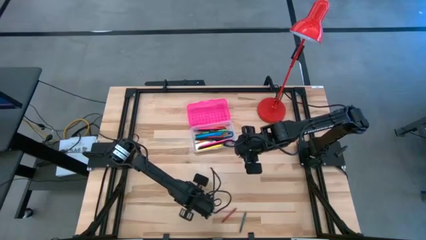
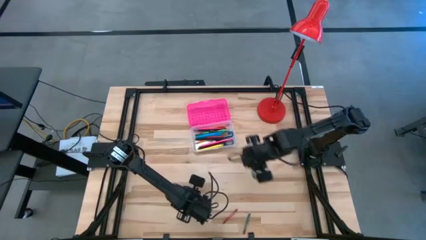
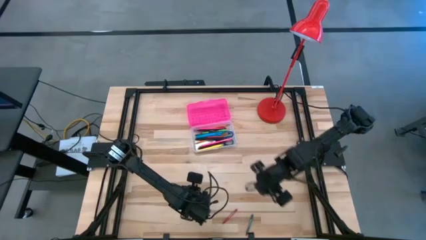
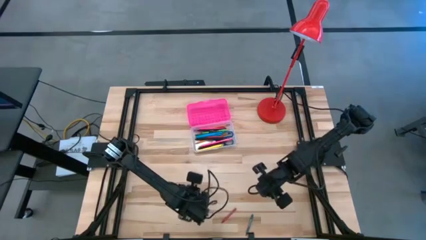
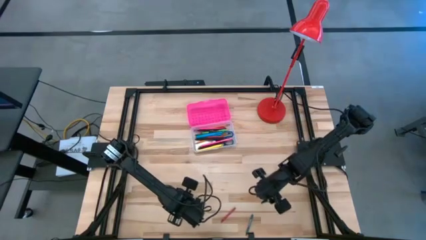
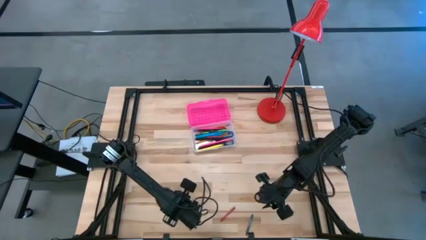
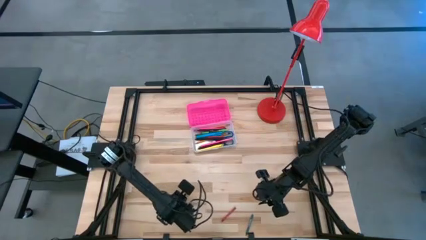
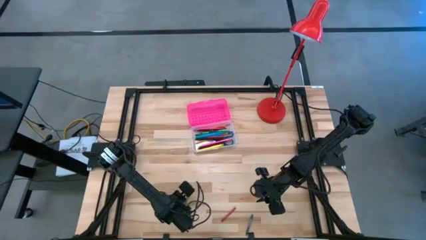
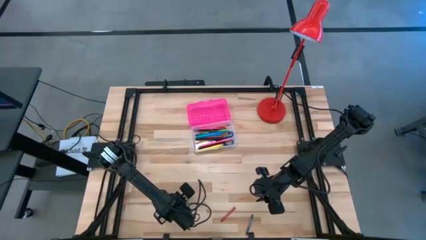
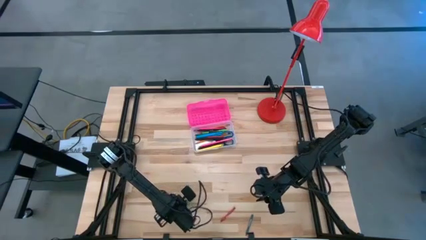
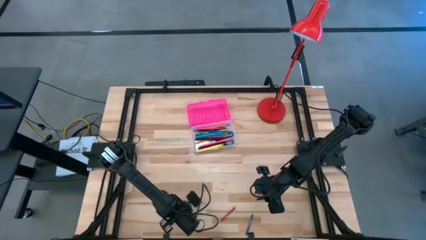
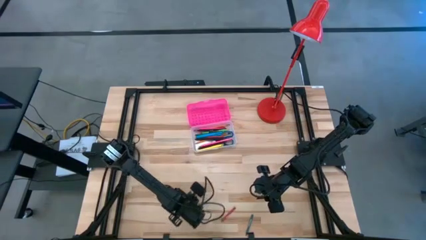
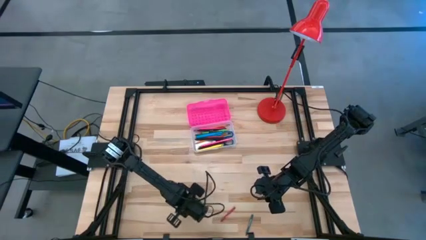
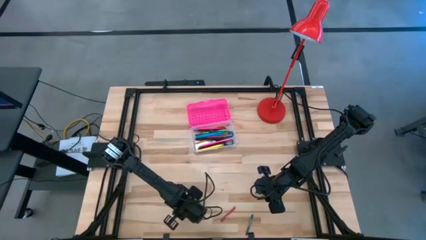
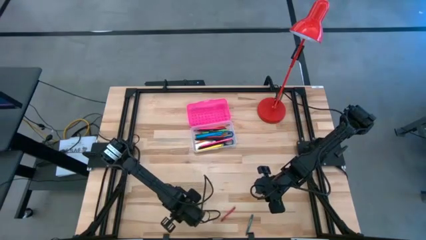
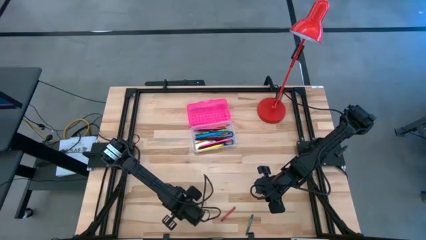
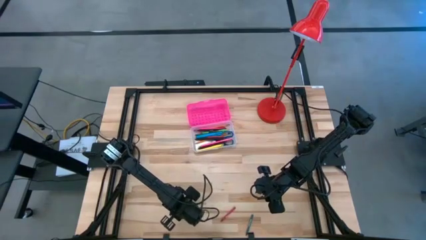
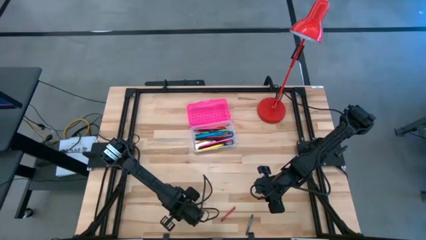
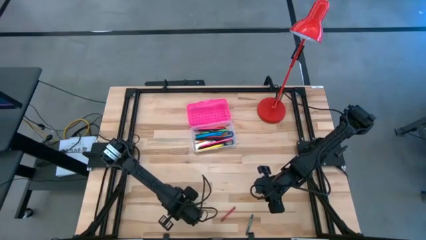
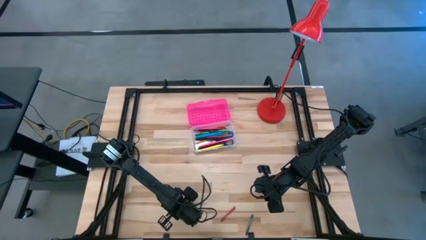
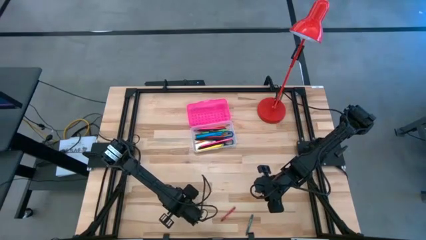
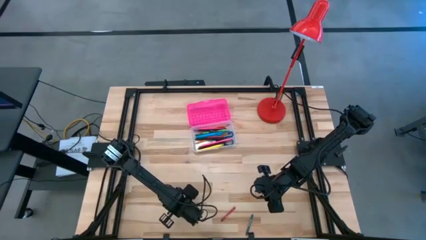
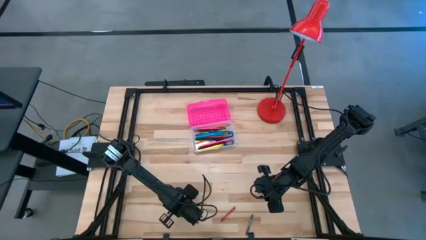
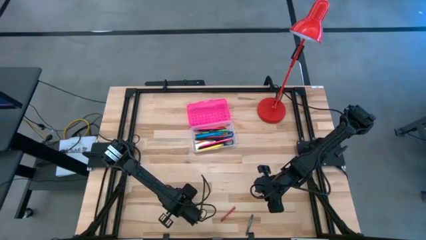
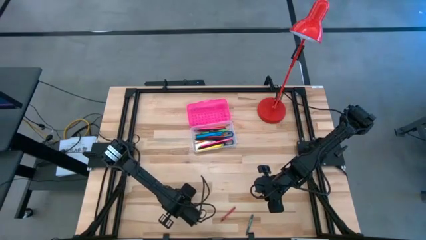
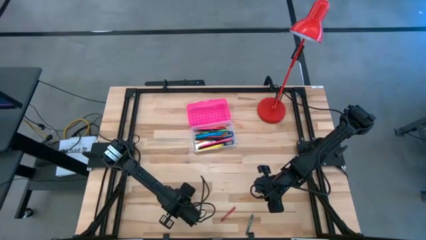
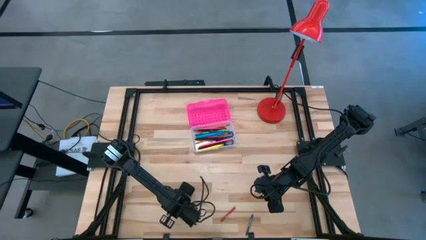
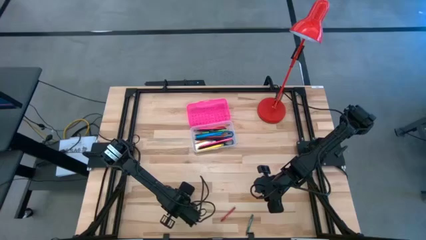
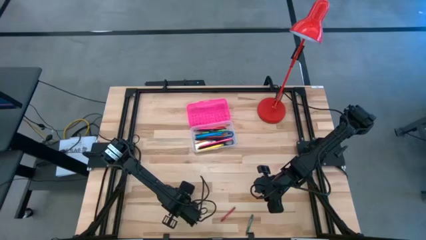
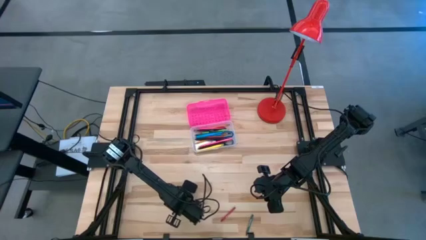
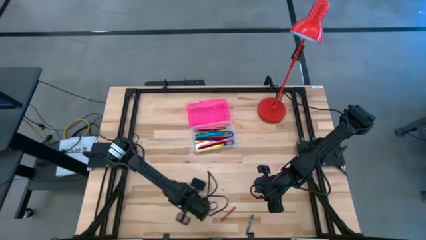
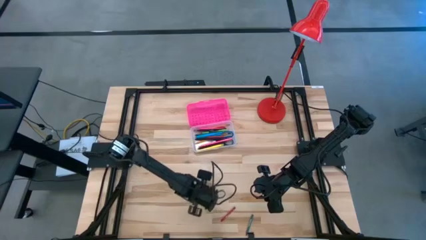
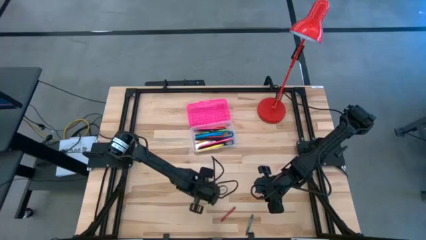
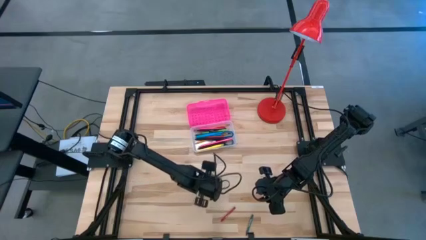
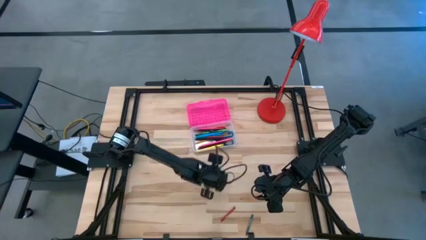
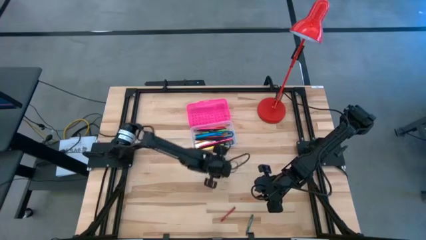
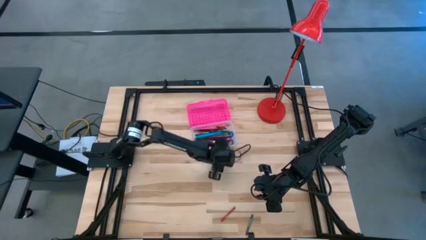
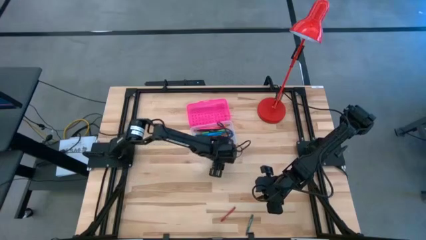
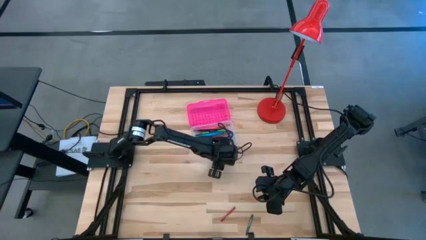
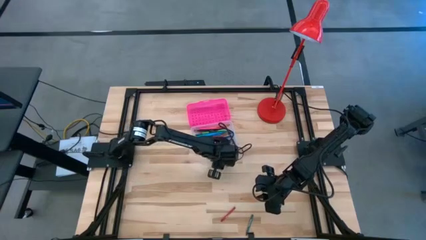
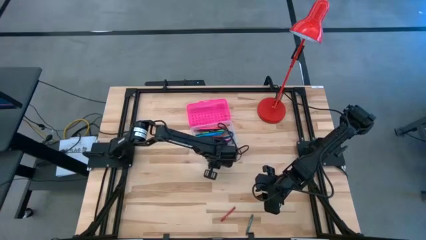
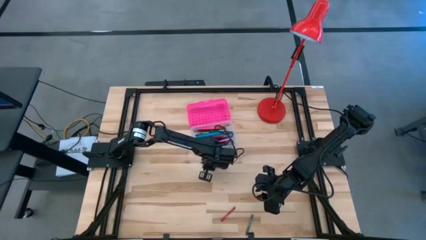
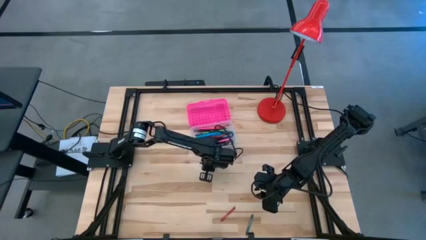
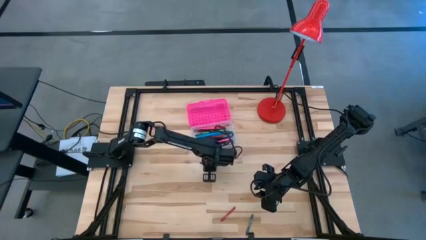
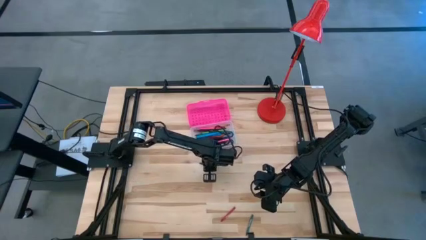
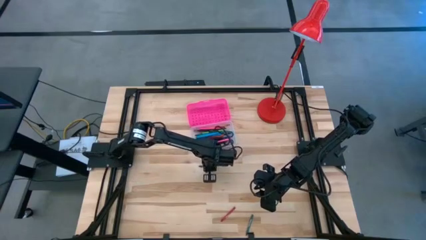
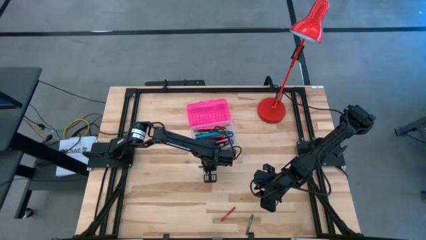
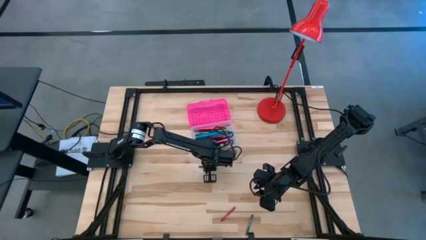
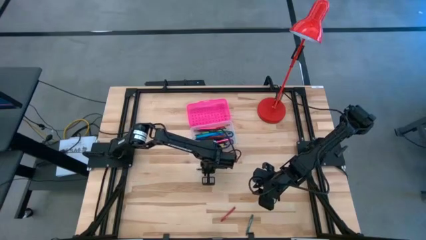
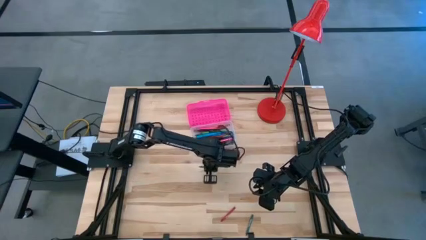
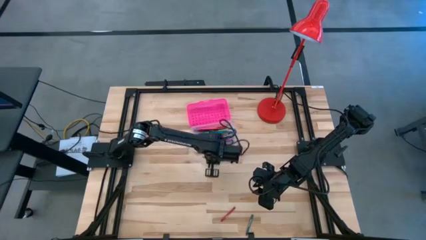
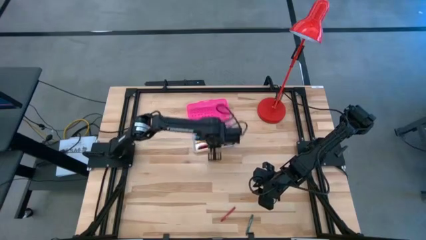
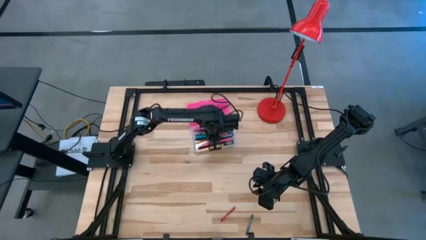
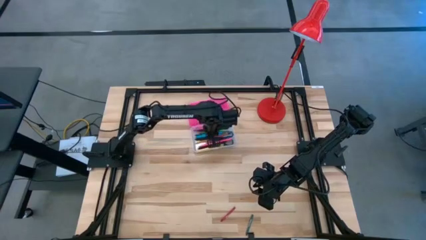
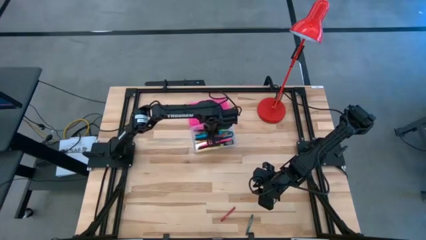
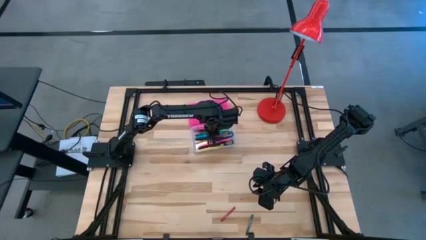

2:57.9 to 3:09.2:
Task: Pick & place school supplies into a supply box
Put the green crayon into the pink supply box

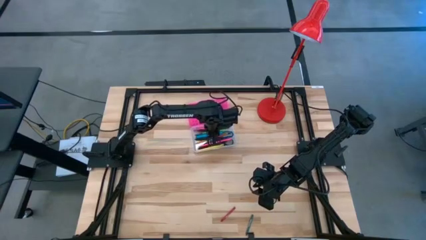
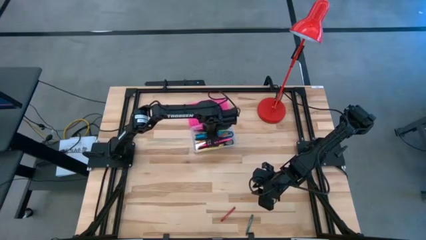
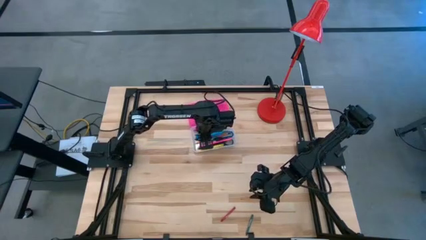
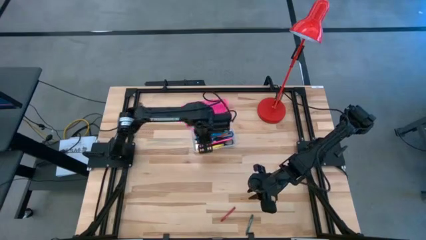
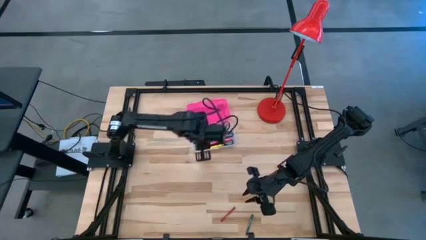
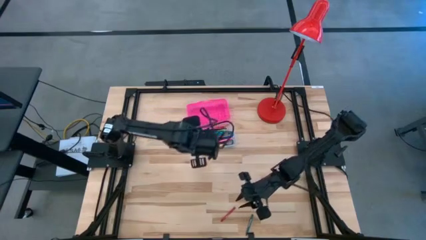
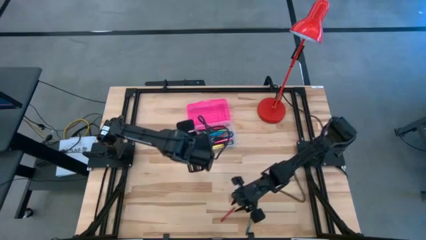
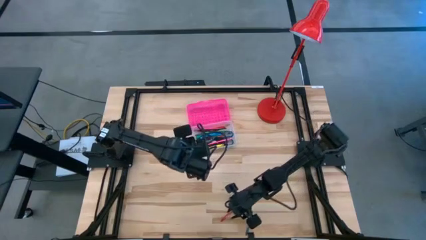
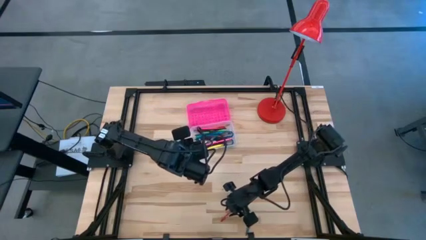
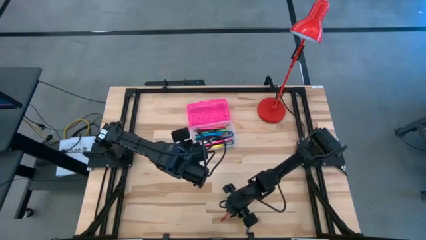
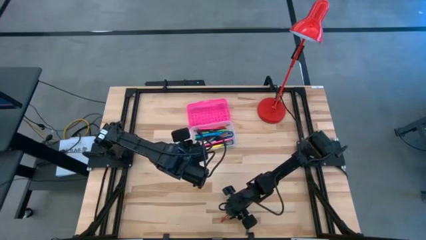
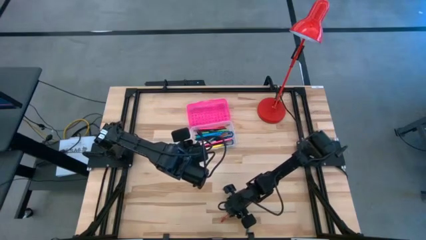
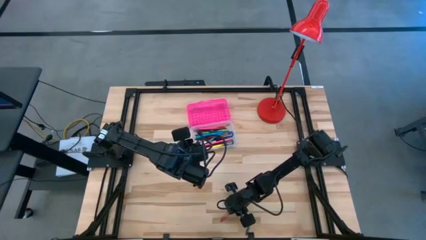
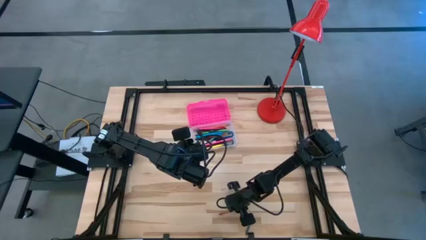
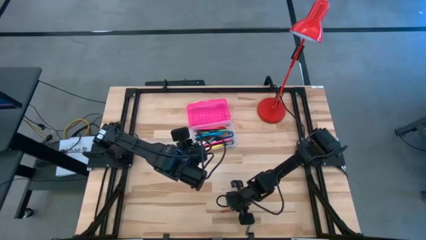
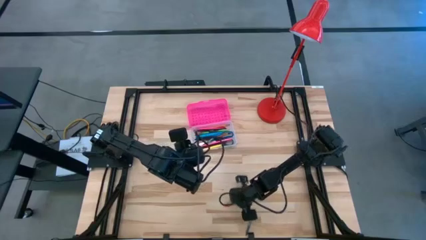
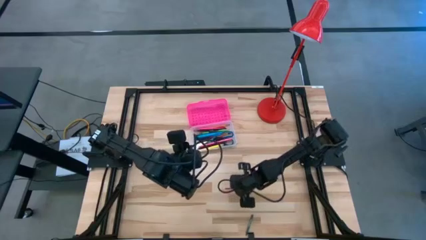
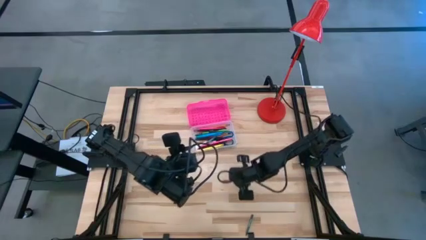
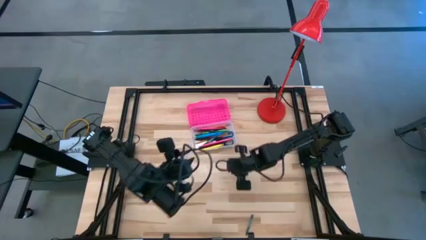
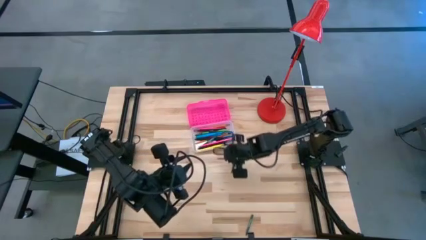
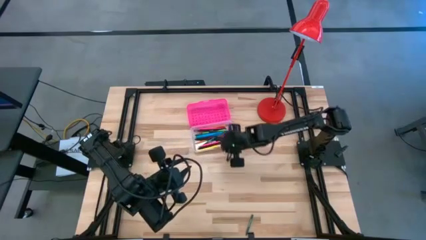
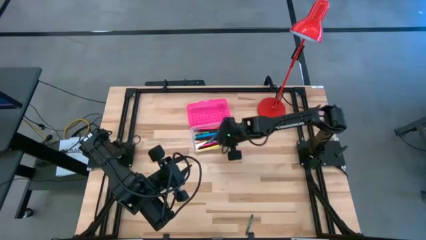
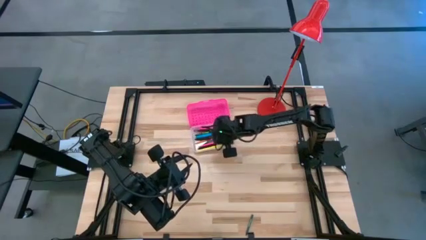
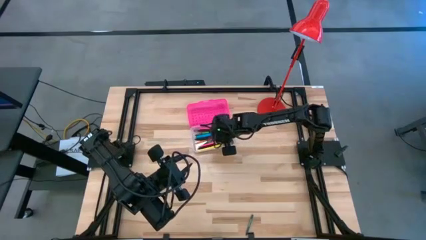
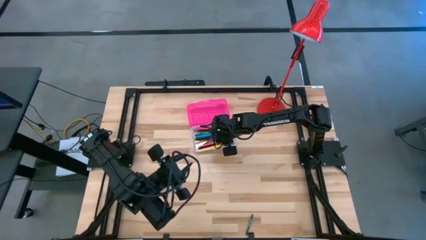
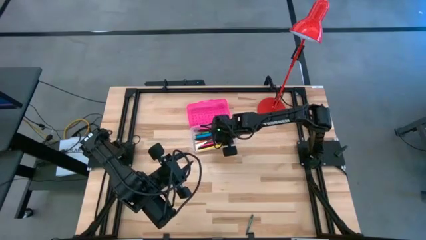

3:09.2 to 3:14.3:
Put the red crayon into the pink supply box
